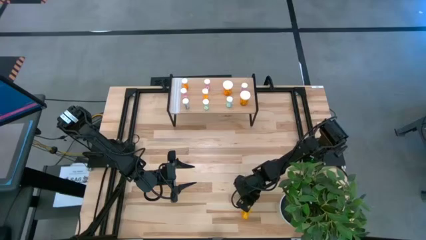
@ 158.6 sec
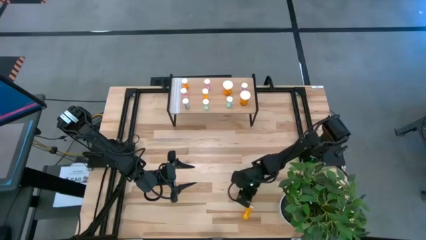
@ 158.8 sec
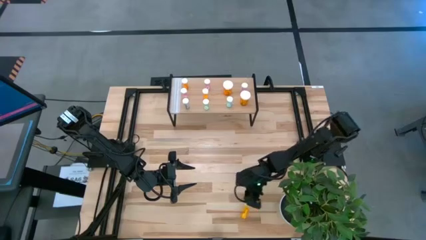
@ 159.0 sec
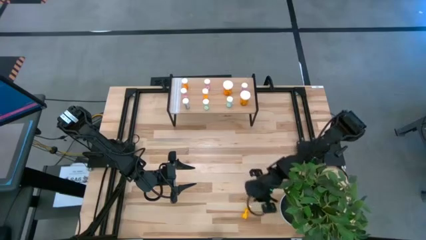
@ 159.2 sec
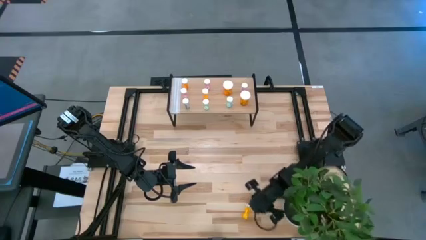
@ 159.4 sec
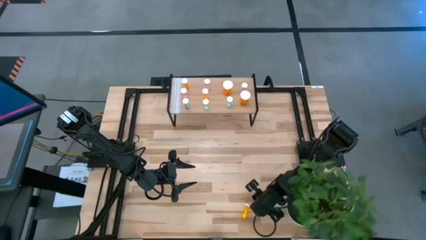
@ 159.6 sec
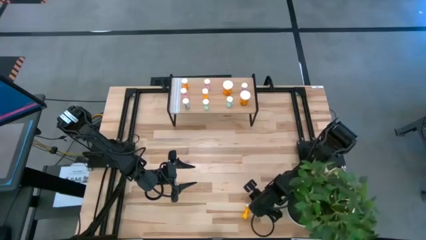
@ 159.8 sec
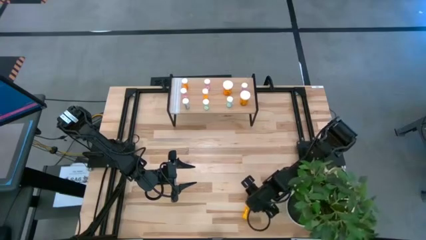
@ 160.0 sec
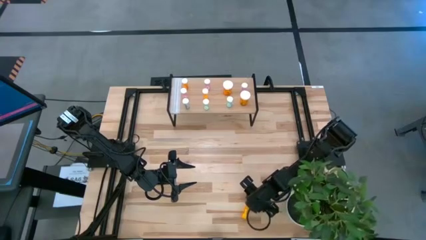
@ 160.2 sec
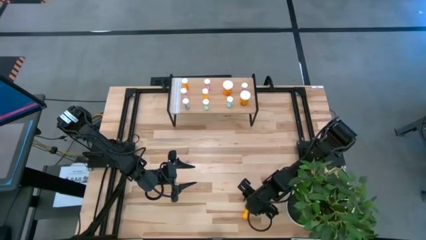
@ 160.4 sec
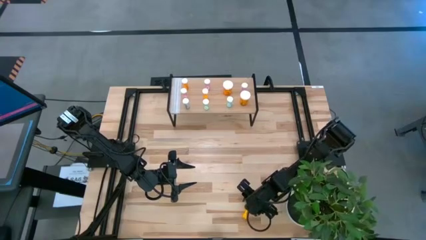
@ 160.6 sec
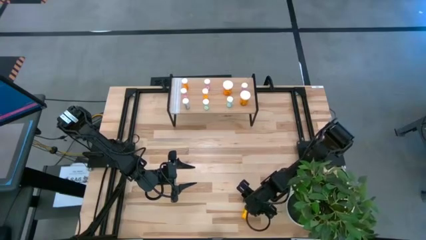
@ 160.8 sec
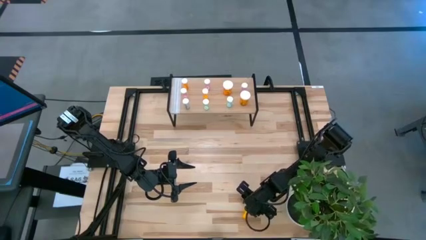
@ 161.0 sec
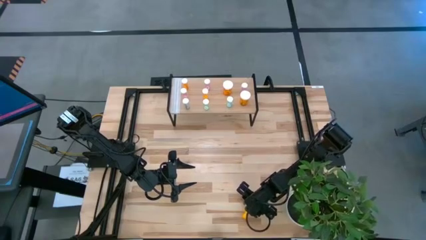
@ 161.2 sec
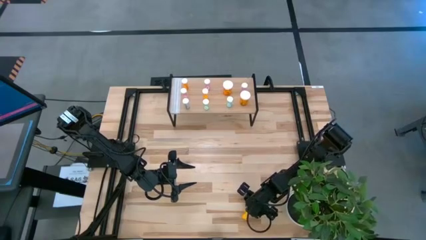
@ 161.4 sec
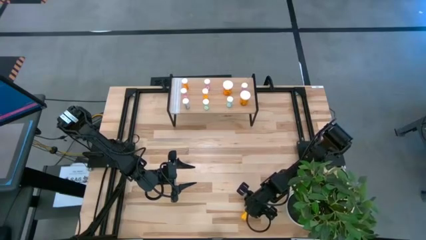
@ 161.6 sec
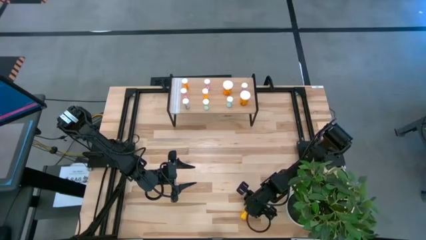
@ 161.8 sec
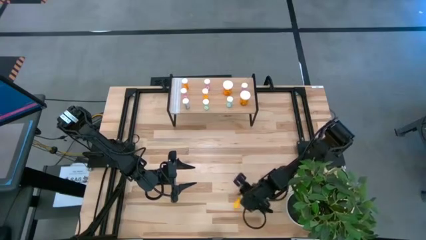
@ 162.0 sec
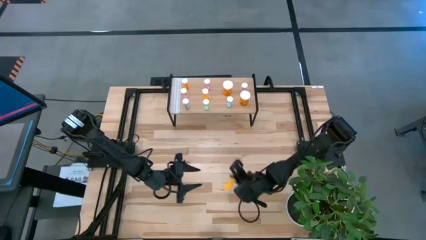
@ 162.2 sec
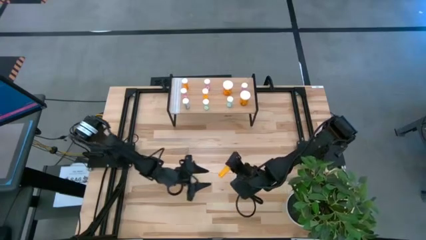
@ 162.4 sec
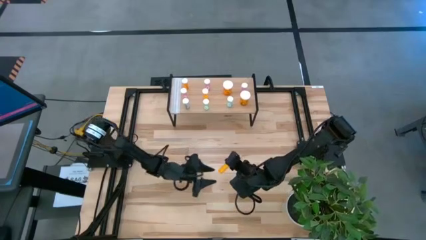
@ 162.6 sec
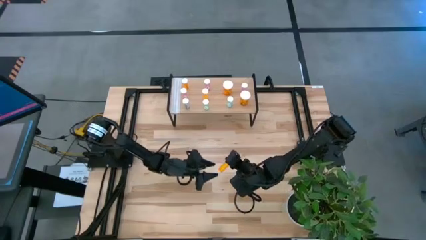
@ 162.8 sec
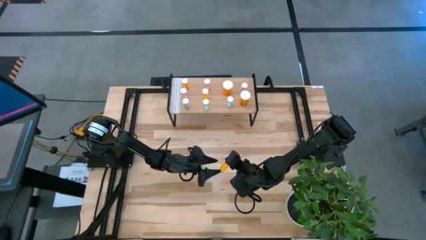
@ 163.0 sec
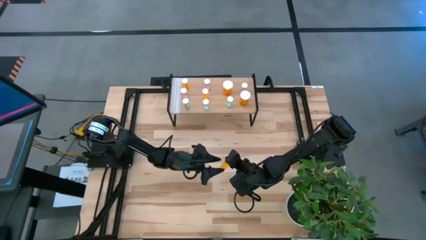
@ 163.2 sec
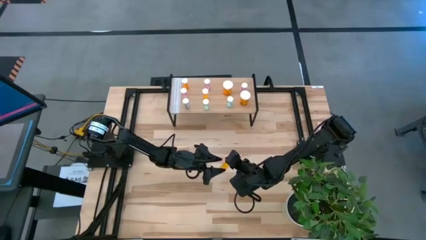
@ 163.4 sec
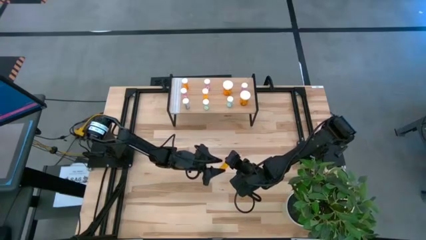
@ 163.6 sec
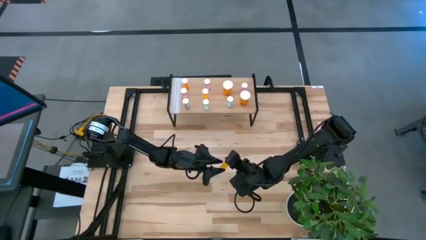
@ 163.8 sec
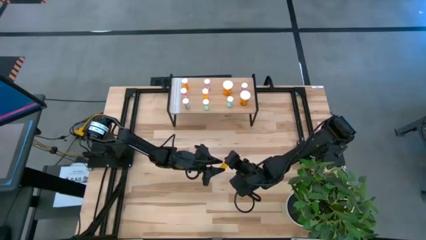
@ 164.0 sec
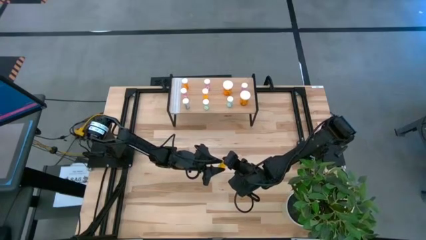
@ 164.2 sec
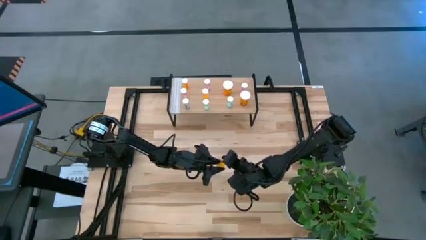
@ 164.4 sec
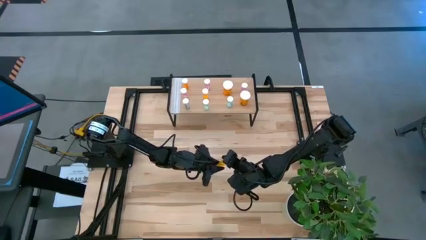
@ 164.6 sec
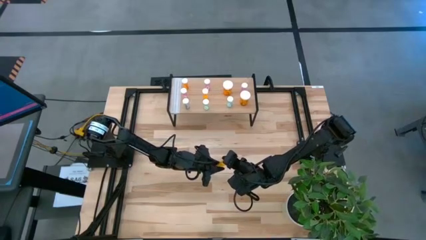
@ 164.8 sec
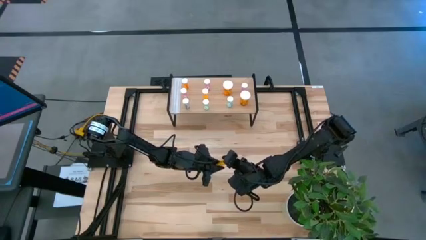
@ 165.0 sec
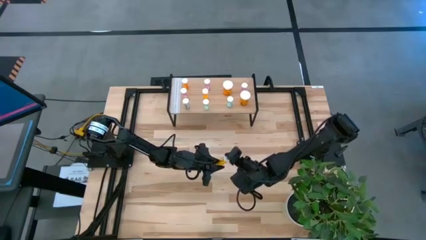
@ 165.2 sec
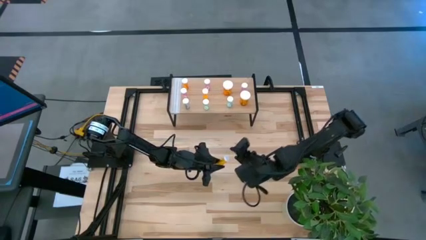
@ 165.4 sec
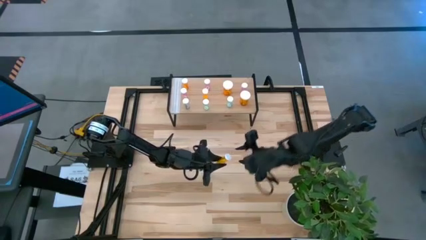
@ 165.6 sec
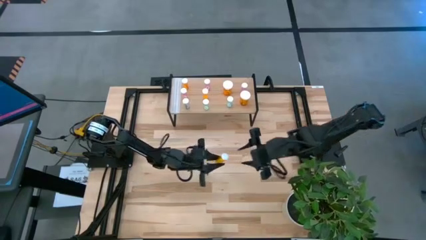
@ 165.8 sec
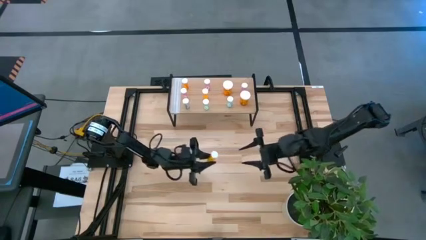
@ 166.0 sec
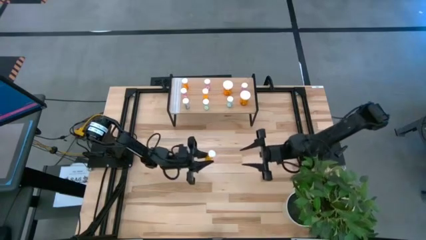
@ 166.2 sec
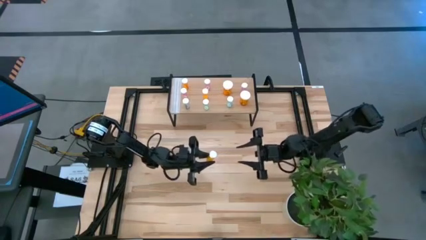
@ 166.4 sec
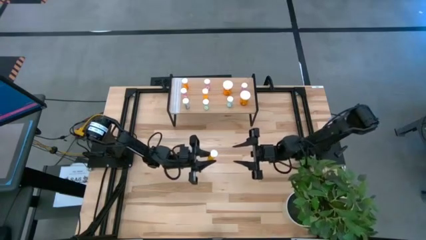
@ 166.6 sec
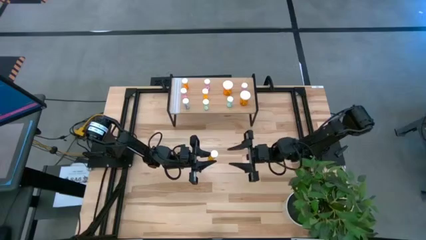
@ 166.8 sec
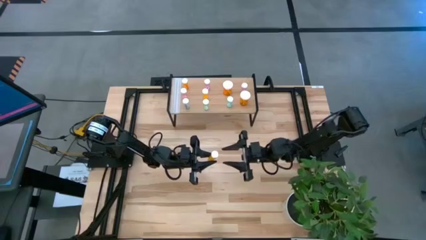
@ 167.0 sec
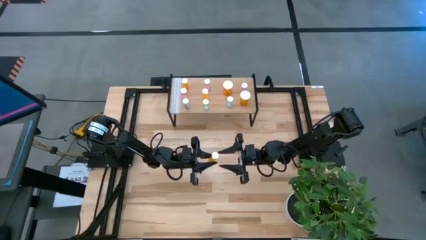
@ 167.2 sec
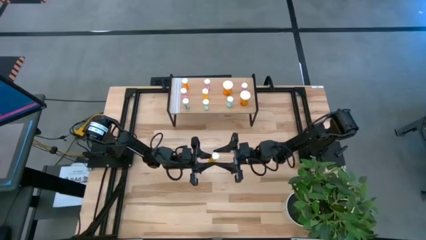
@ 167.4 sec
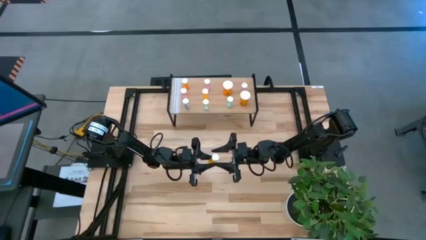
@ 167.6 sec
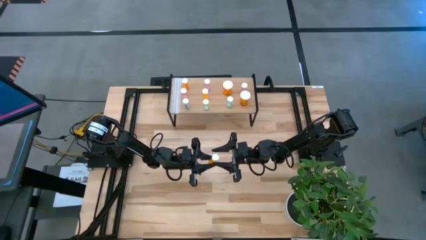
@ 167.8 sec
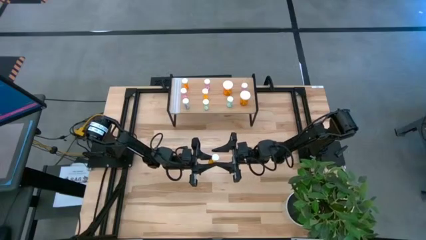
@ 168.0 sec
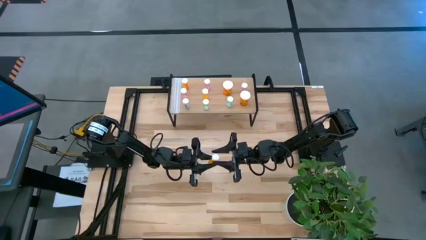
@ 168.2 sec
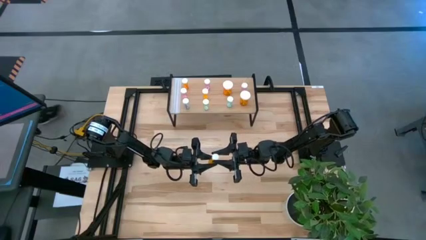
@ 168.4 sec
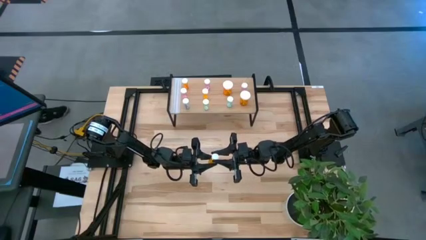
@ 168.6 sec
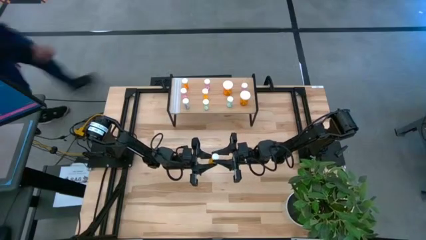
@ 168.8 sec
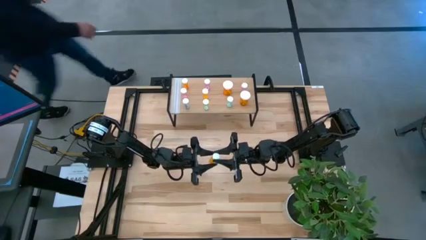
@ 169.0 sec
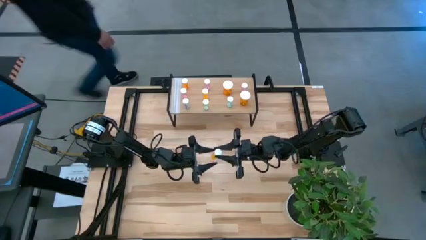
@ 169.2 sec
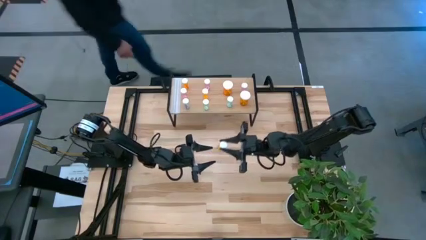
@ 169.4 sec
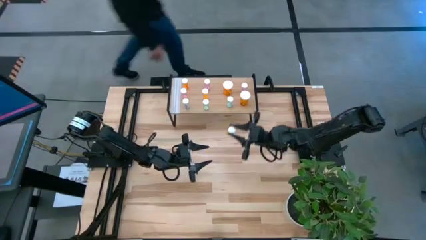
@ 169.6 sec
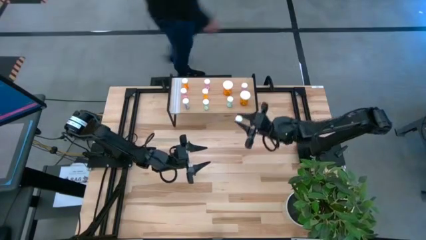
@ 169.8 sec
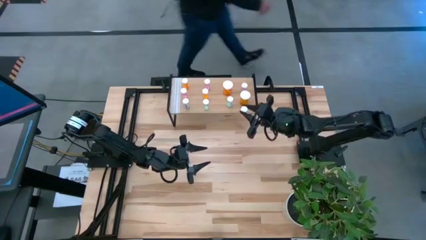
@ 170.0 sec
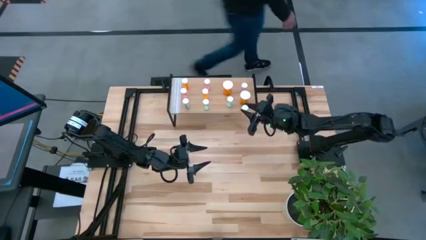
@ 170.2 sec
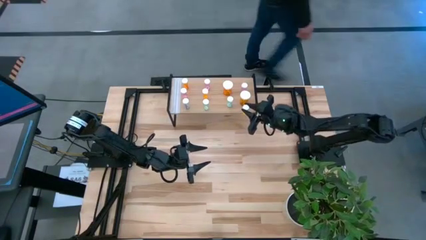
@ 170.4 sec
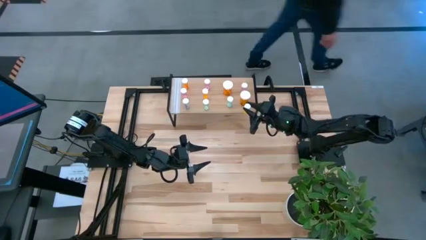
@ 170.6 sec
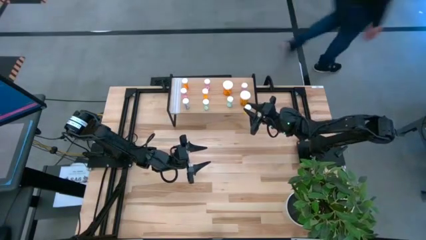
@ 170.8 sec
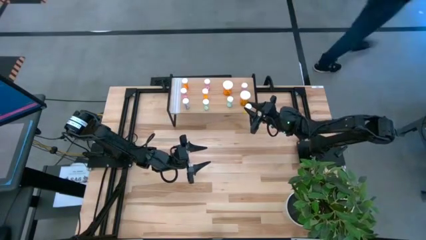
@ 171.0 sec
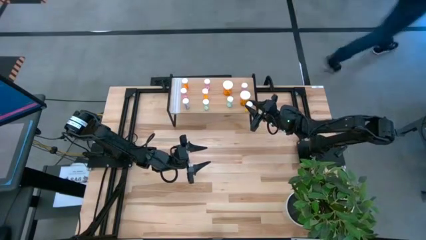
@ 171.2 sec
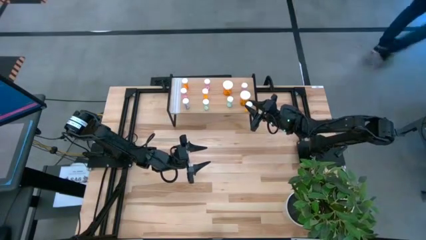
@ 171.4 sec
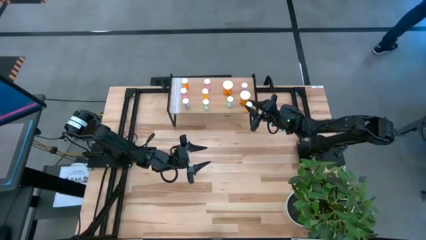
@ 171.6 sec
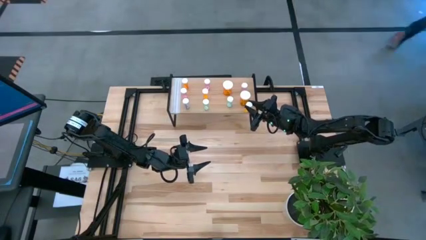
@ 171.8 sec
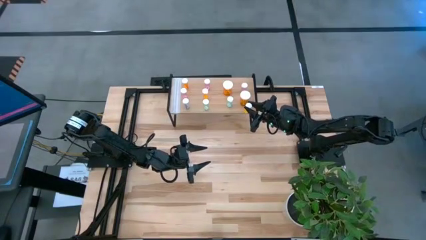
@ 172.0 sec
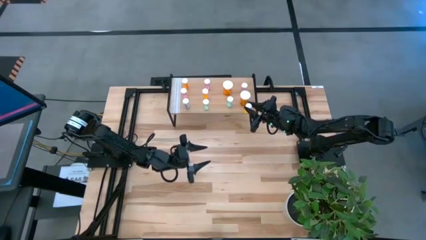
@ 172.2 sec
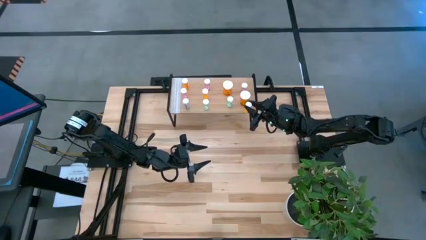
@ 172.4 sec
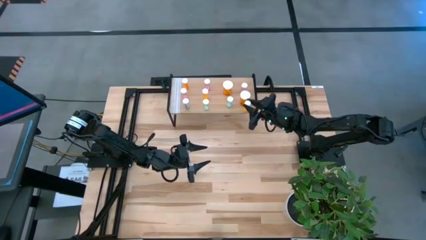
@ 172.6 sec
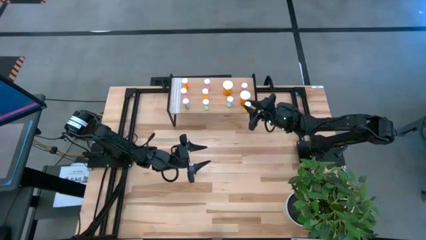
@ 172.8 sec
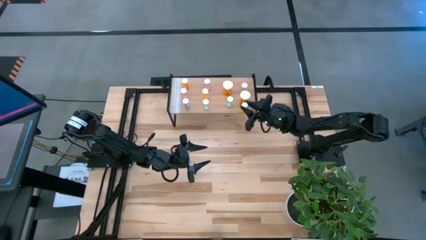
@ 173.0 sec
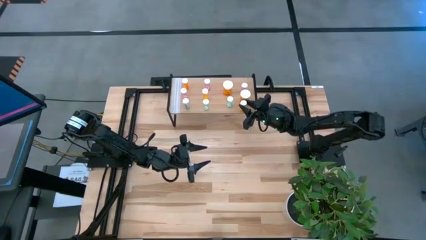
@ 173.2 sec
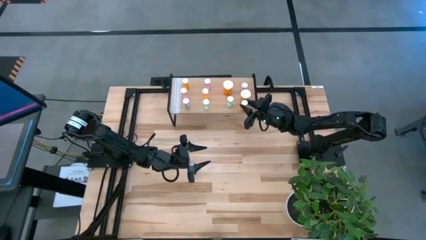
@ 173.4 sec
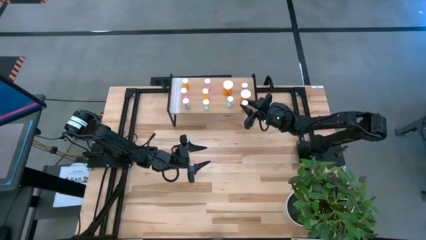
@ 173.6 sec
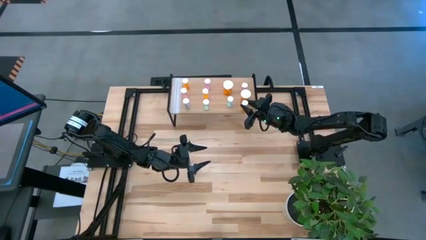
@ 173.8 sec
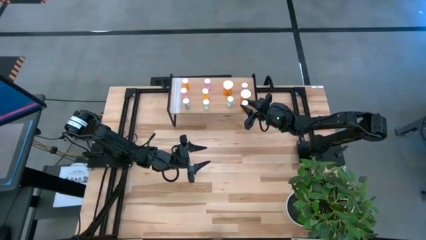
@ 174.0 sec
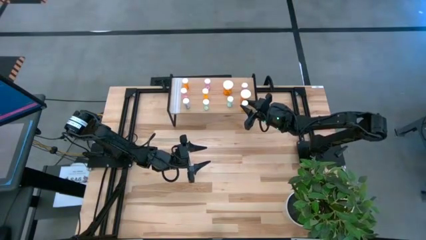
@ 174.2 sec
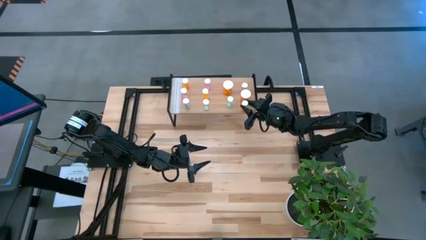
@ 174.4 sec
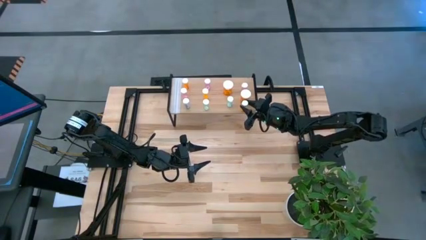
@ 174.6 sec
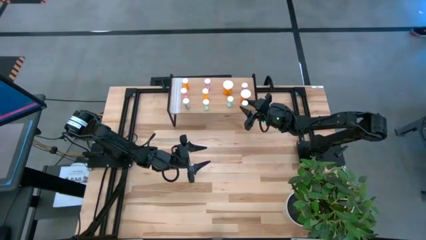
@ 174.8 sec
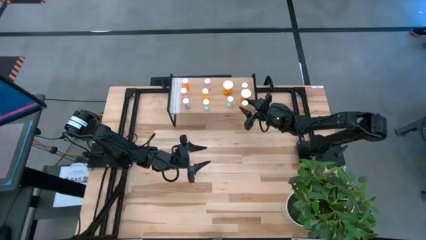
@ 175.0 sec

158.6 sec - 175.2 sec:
Task: Pick and place medicine bottles onto shelf by color
Put the small orange pill bottle on the shelf
